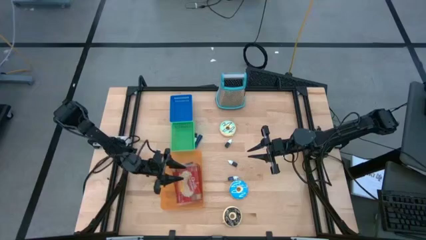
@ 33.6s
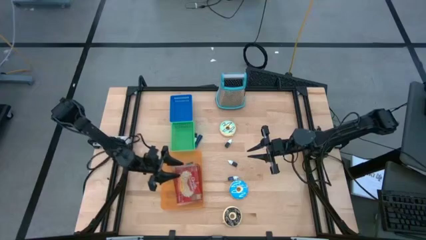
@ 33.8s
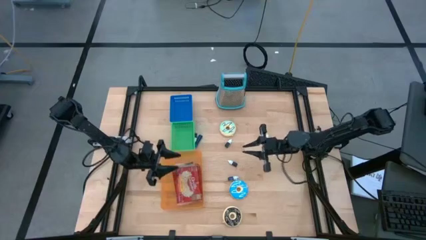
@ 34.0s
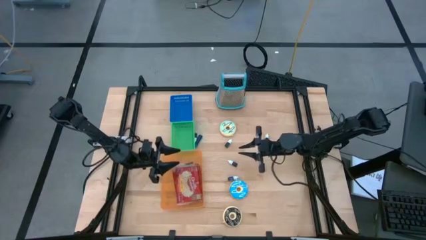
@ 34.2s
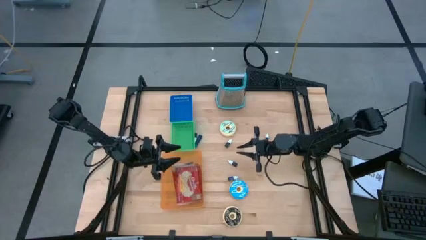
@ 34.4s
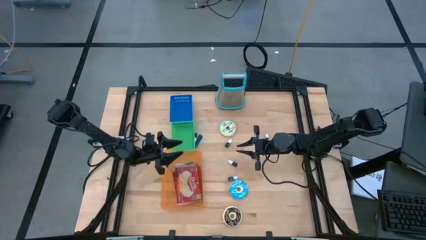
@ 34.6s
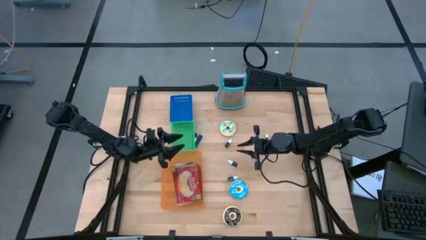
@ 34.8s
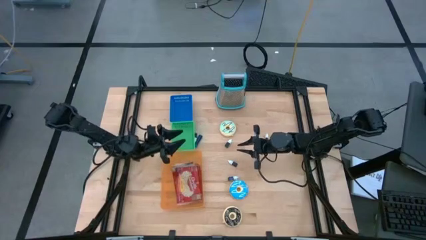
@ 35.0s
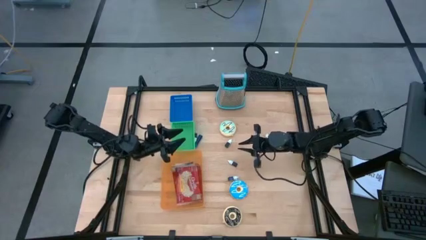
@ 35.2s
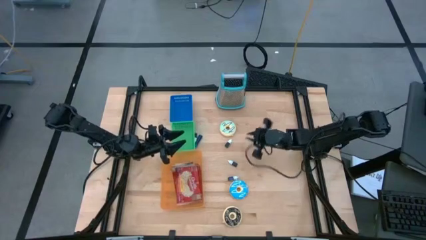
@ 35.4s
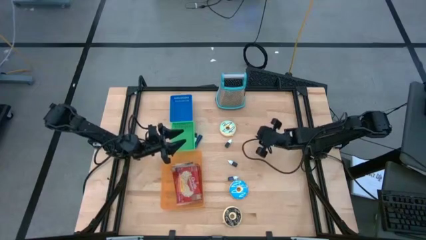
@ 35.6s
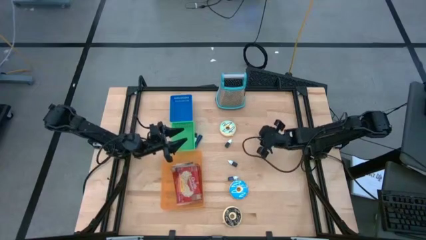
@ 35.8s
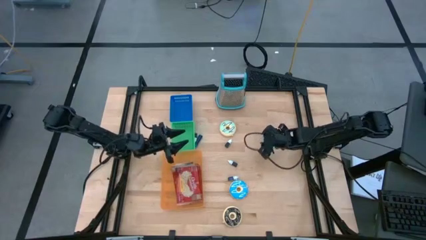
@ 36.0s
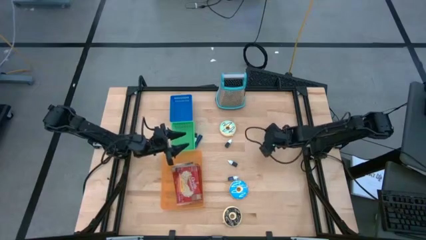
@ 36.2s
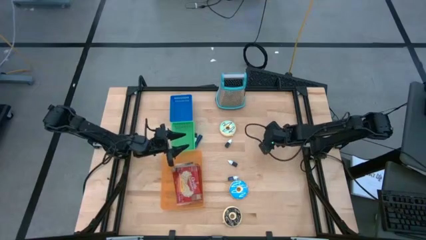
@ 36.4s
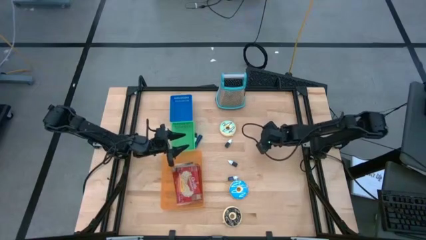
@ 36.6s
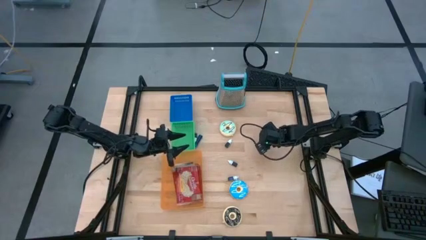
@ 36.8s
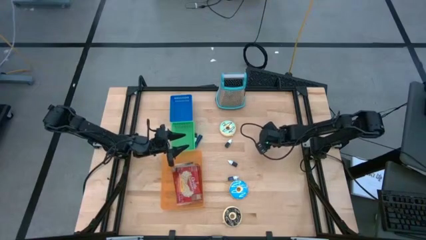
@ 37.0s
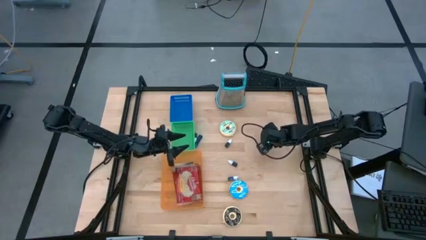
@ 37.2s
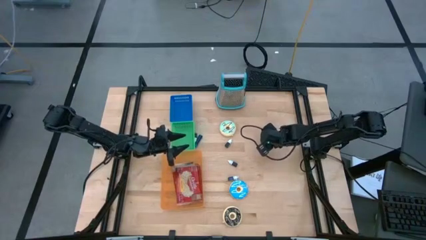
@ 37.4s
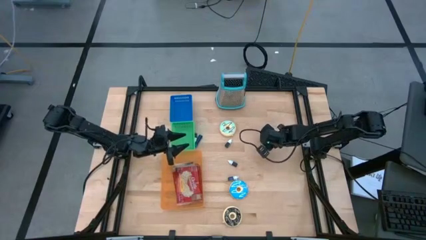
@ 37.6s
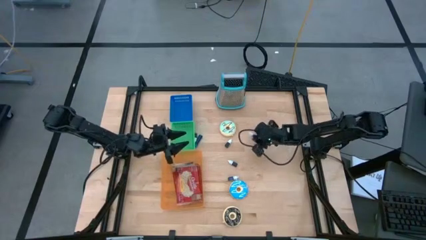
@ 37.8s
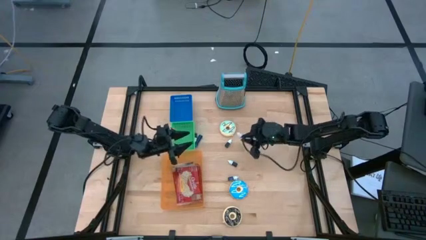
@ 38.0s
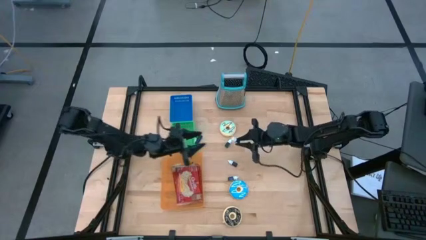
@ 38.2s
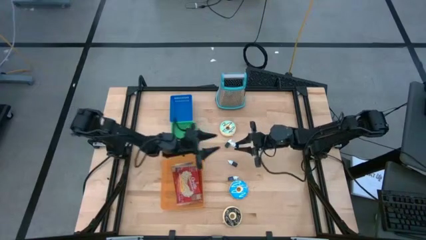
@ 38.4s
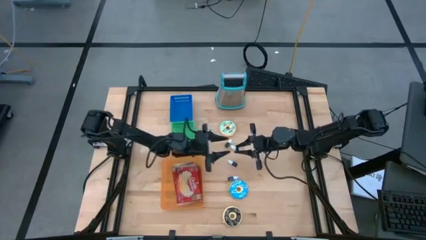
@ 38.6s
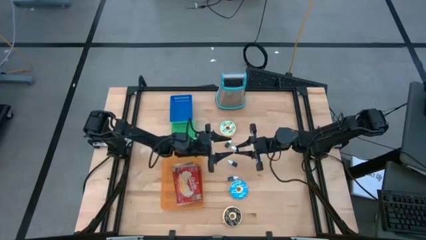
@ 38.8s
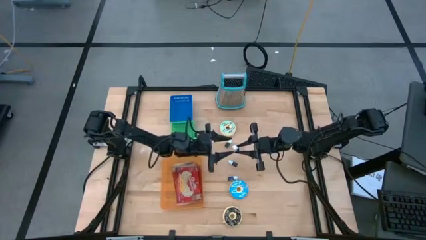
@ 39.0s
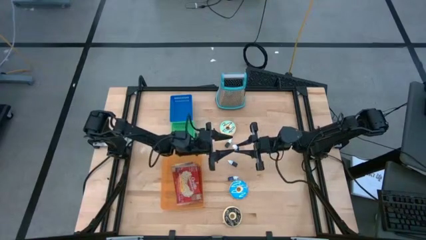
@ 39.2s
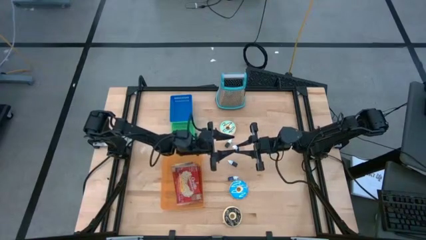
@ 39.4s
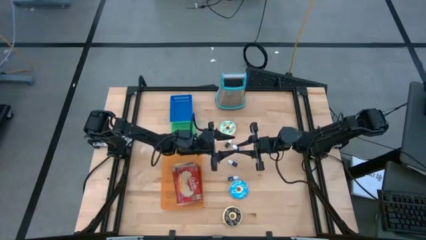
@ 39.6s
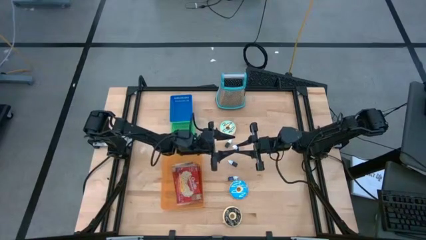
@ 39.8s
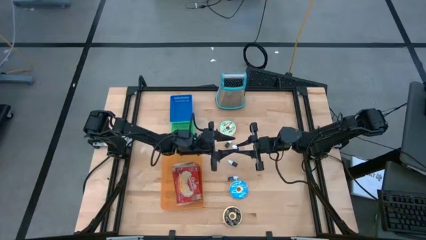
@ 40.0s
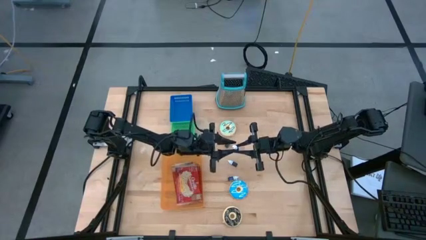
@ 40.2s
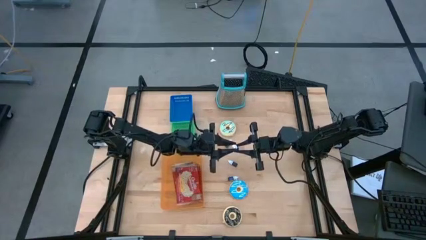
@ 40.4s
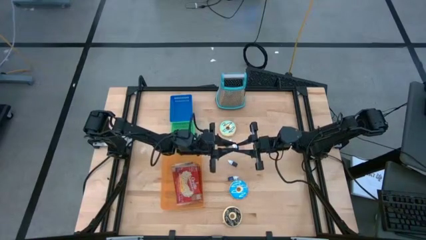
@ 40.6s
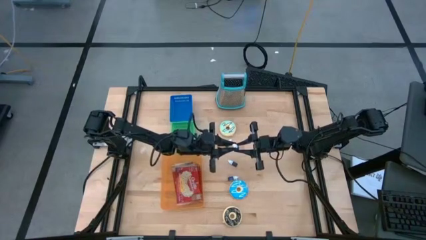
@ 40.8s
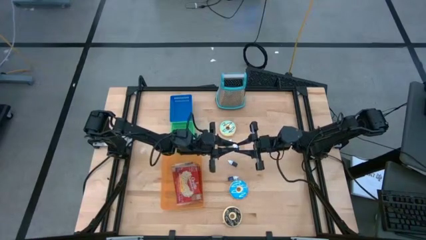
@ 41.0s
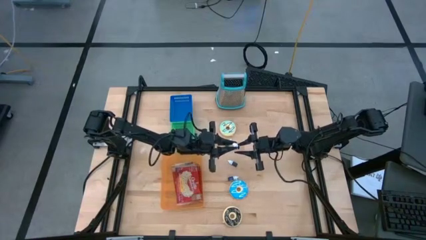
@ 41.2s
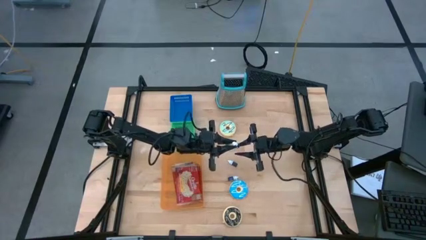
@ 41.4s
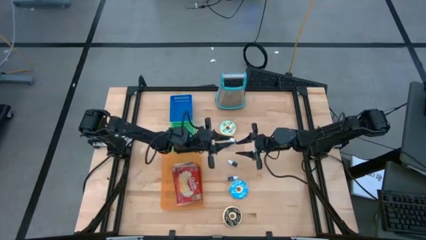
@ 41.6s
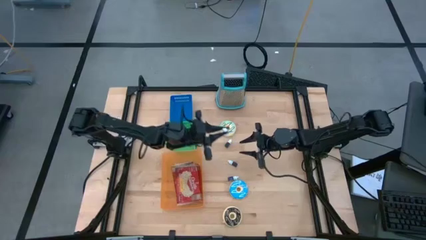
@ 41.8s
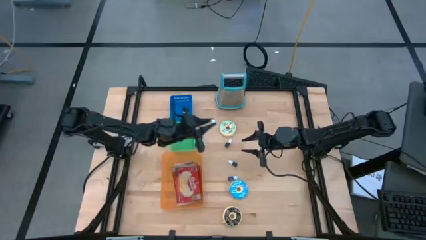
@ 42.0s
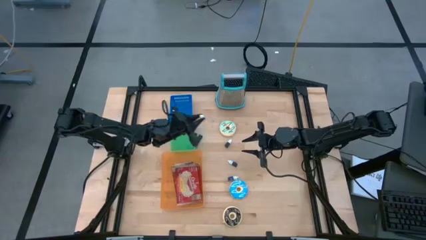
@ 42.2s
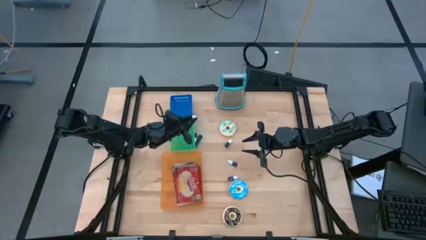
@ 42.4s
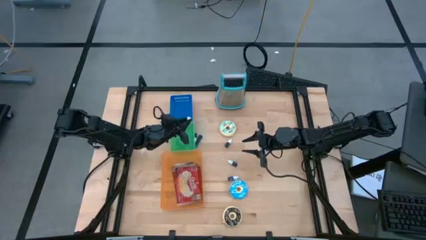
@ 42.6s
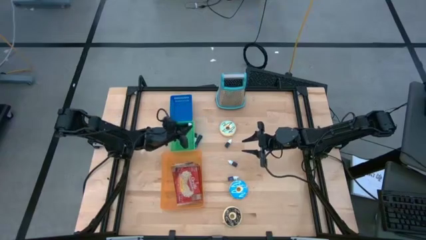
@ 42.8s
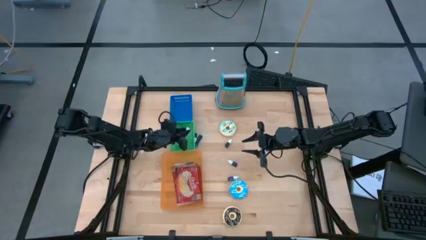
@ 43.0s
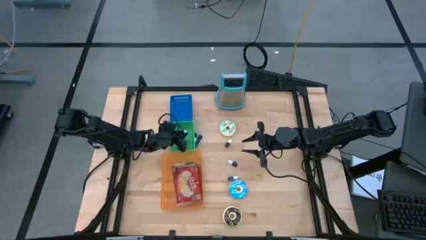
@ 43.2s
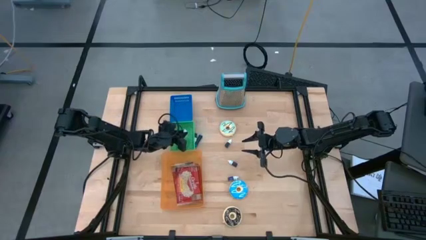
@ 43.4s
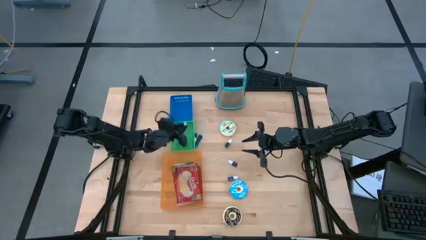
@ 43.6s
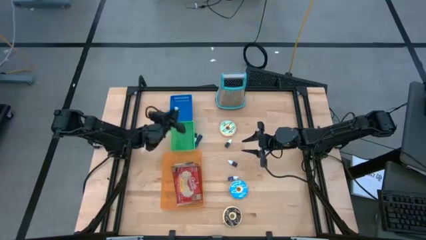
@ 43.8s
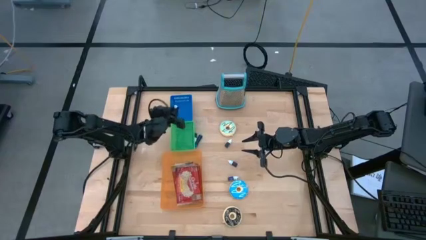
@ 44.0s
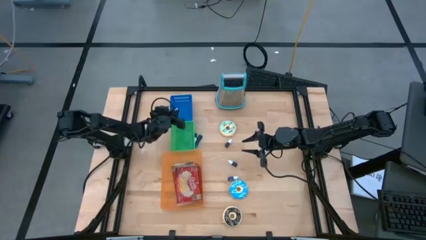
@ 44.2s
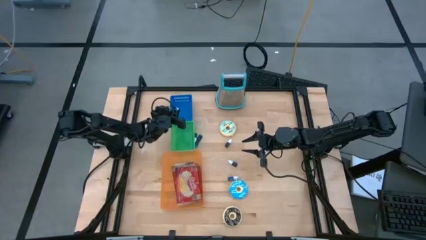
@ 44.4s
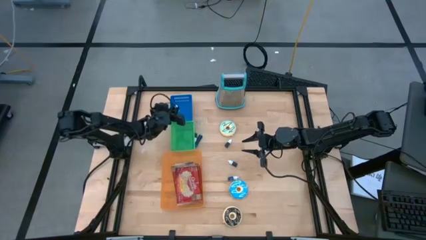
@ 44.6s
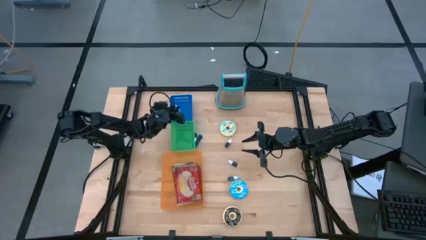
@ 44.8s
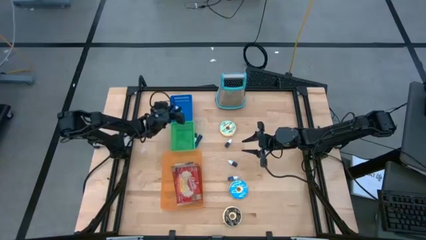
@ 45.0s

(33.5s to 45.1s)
Put the green food coloring bottle into the blue bin
